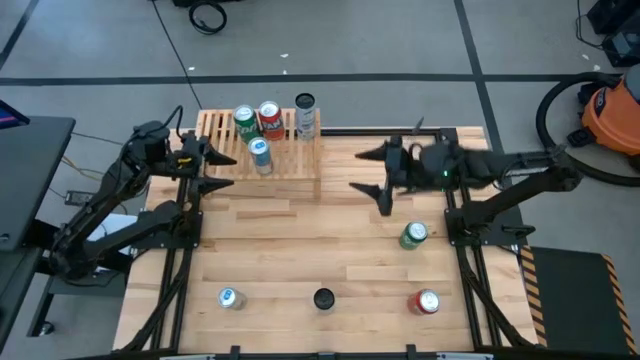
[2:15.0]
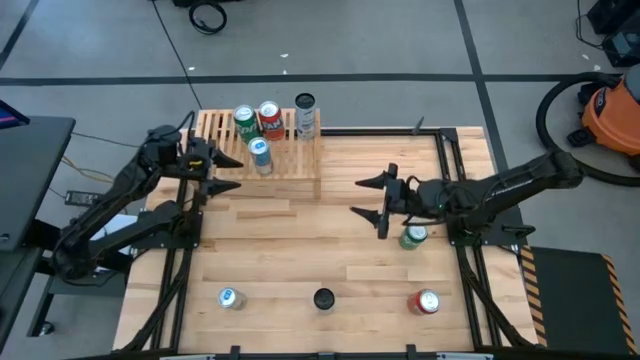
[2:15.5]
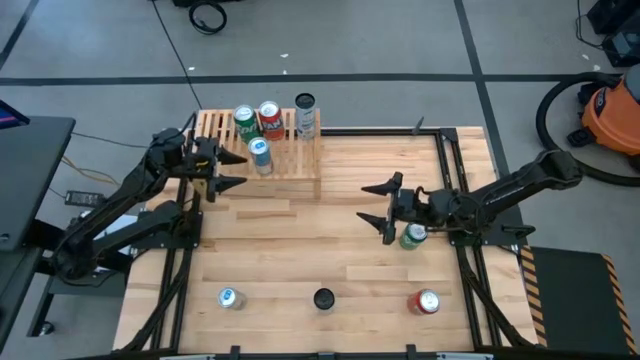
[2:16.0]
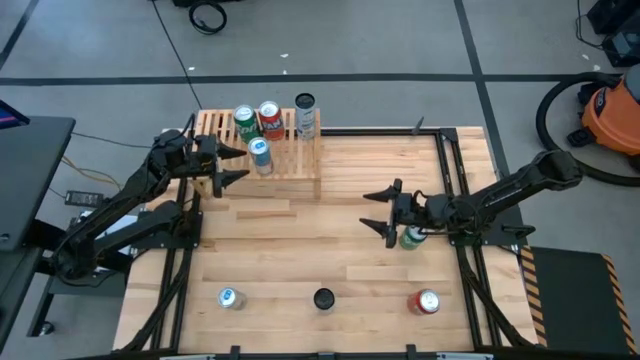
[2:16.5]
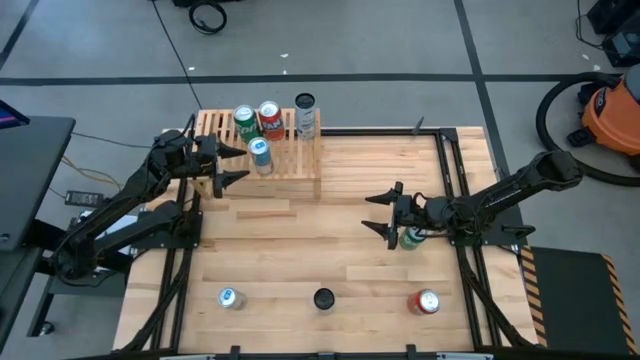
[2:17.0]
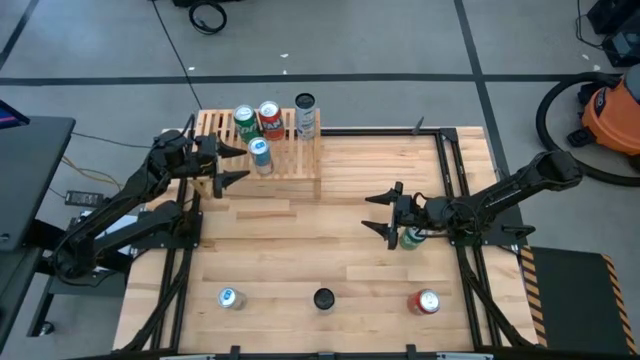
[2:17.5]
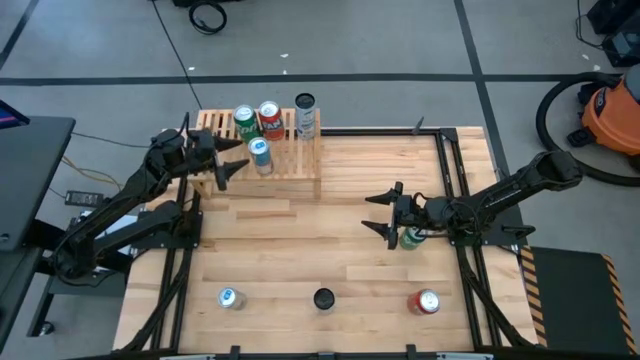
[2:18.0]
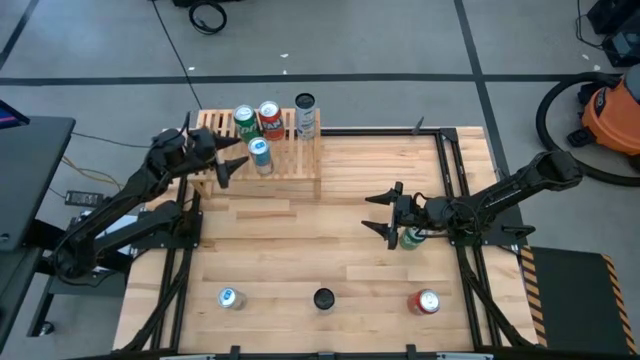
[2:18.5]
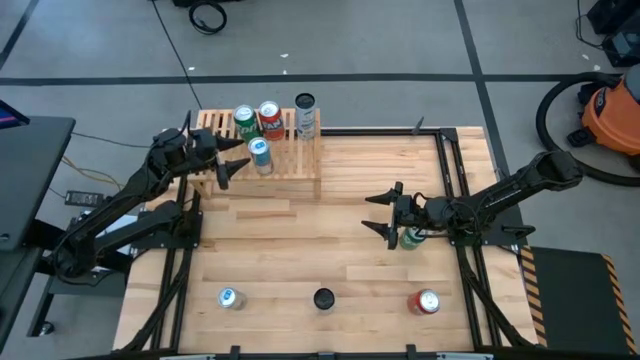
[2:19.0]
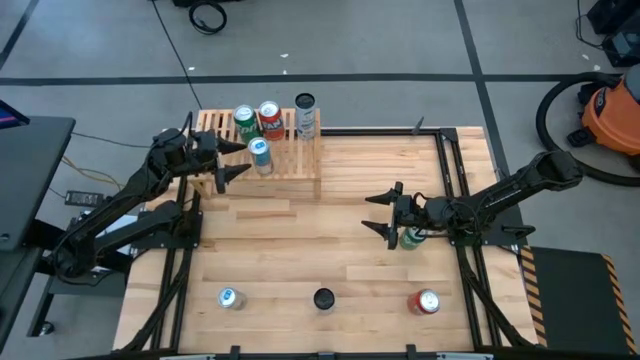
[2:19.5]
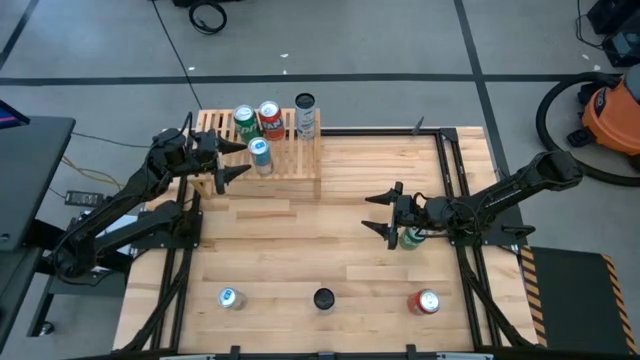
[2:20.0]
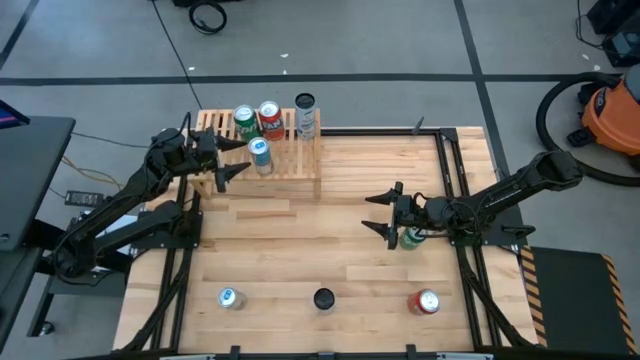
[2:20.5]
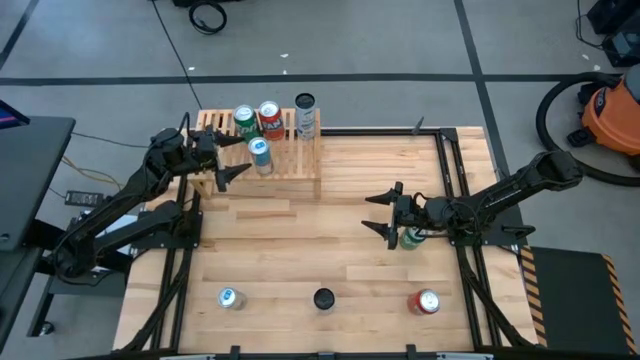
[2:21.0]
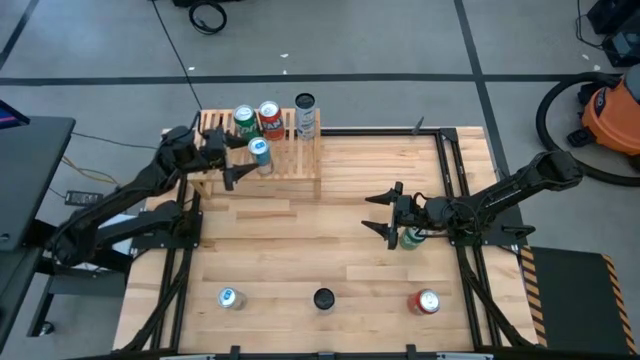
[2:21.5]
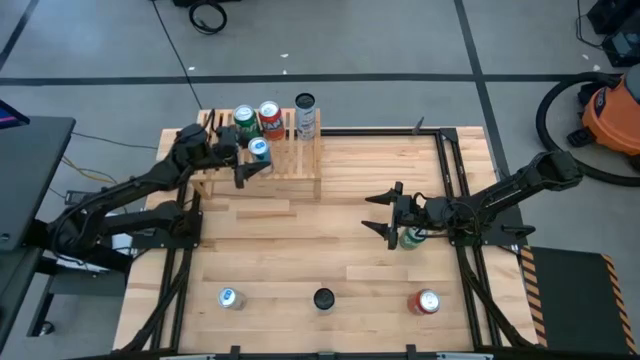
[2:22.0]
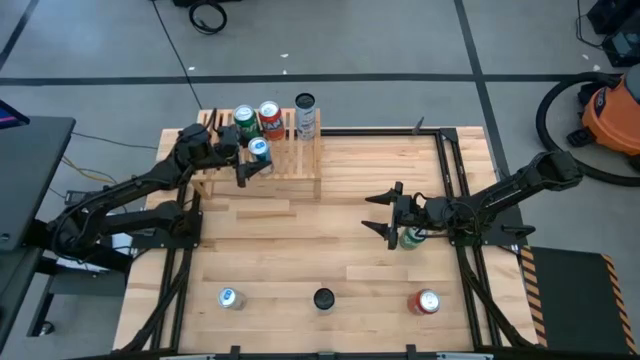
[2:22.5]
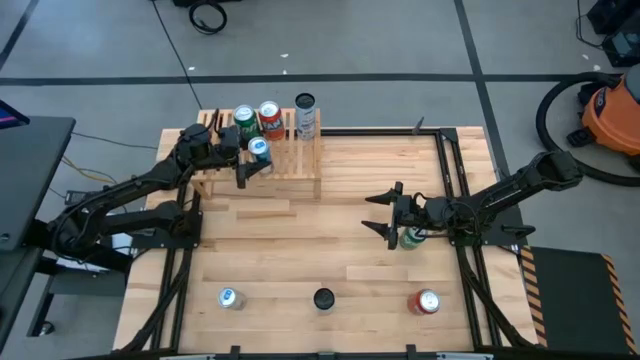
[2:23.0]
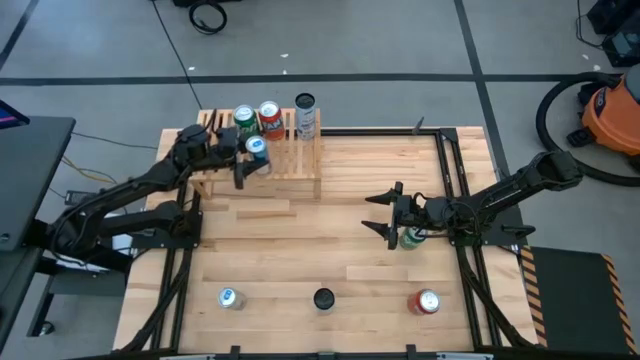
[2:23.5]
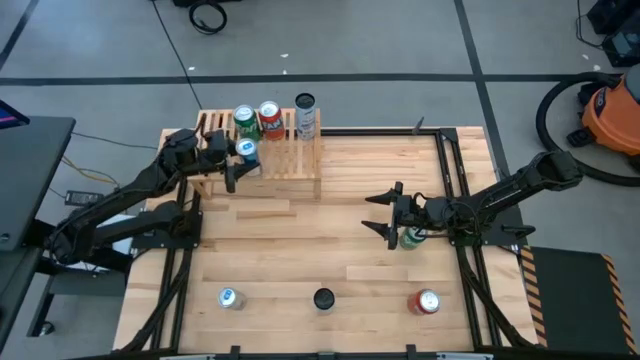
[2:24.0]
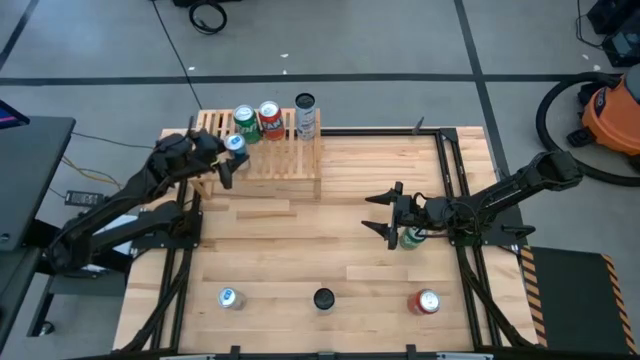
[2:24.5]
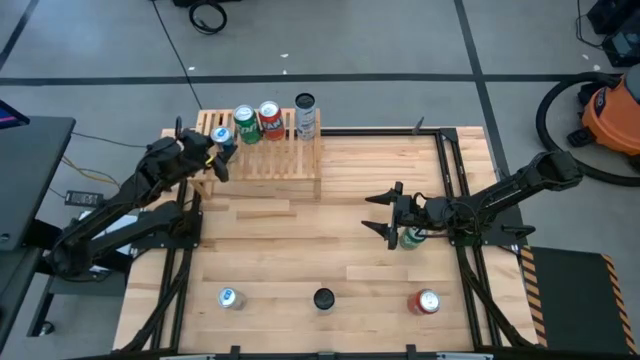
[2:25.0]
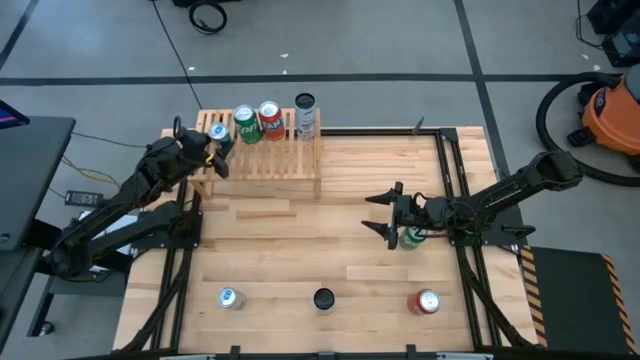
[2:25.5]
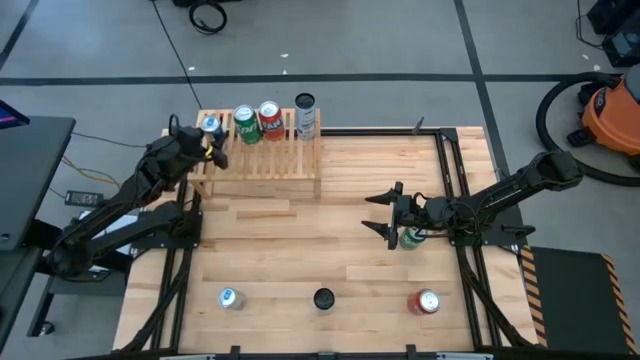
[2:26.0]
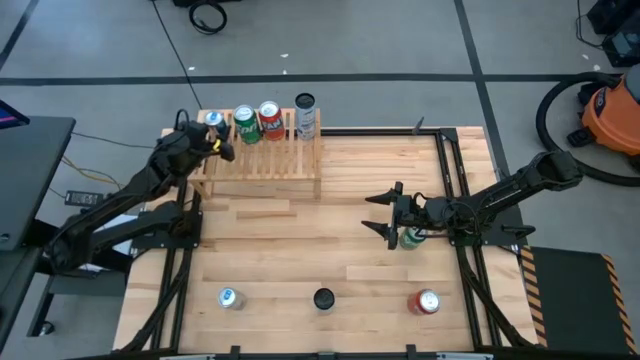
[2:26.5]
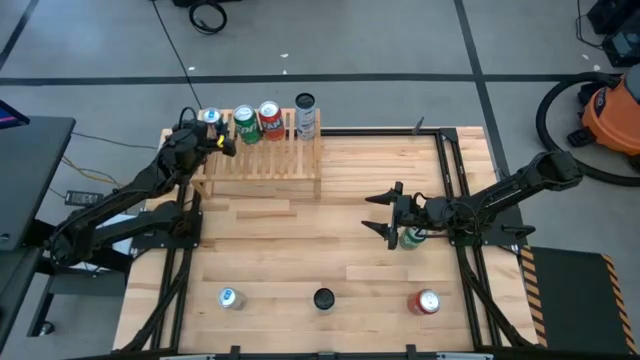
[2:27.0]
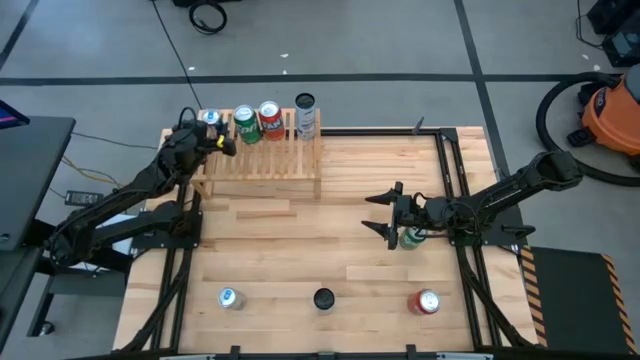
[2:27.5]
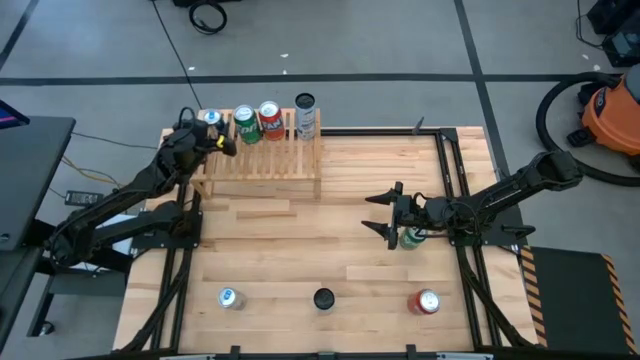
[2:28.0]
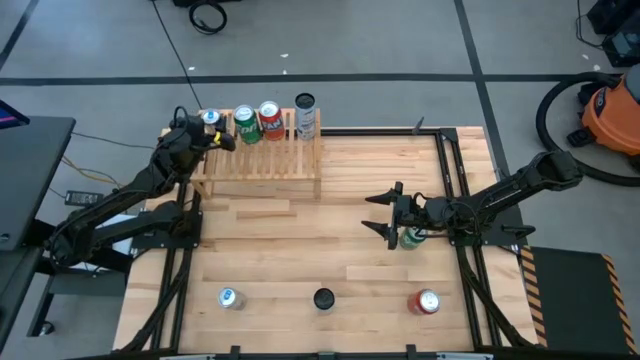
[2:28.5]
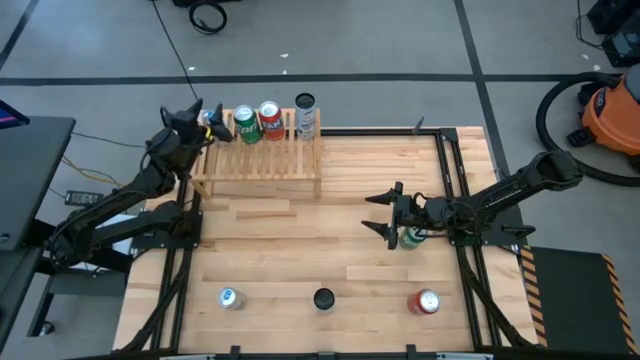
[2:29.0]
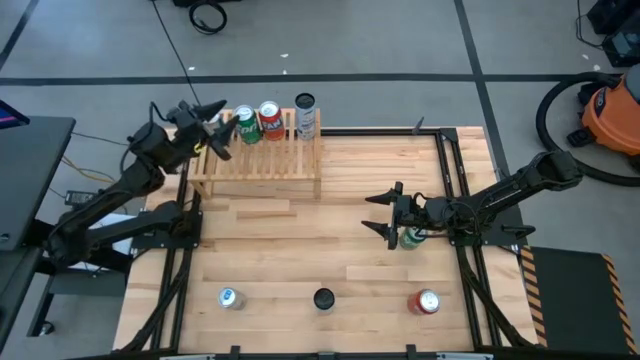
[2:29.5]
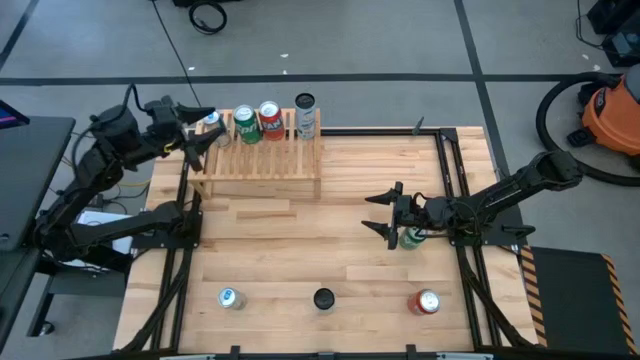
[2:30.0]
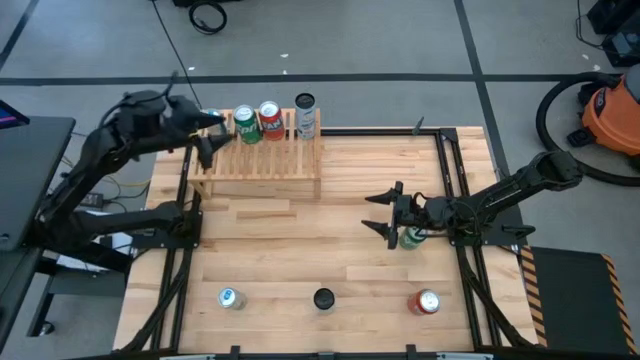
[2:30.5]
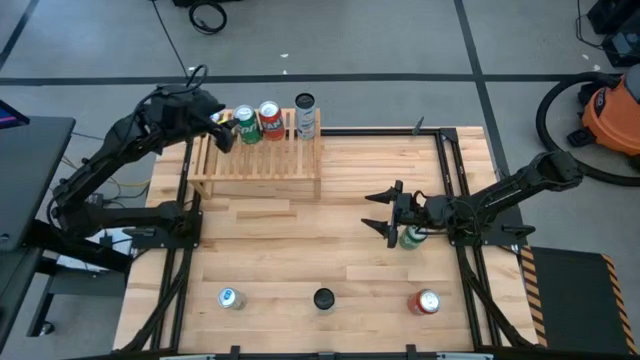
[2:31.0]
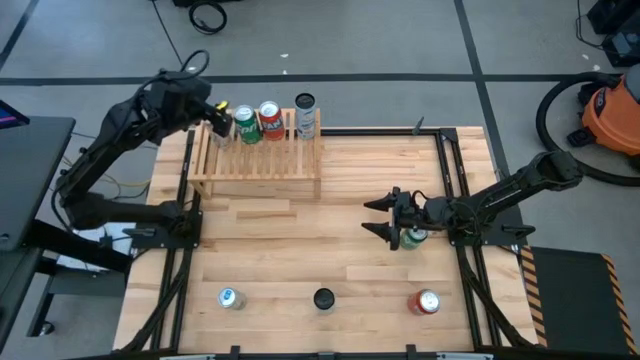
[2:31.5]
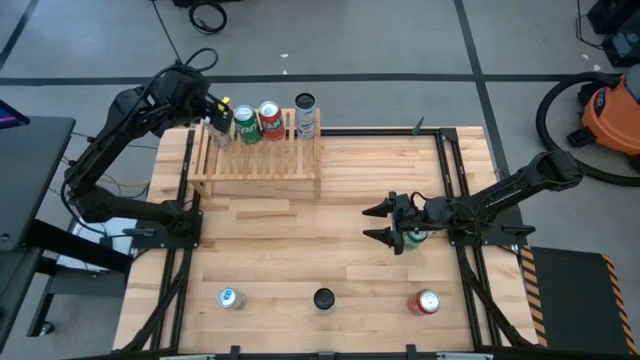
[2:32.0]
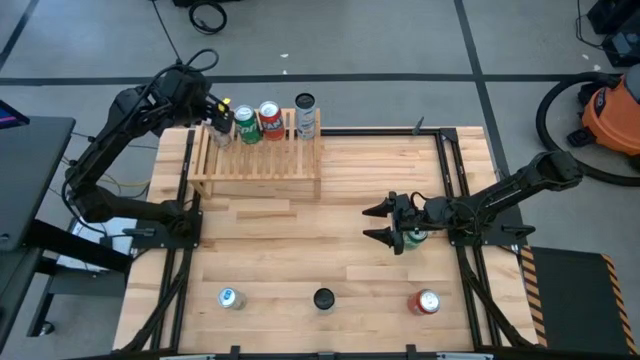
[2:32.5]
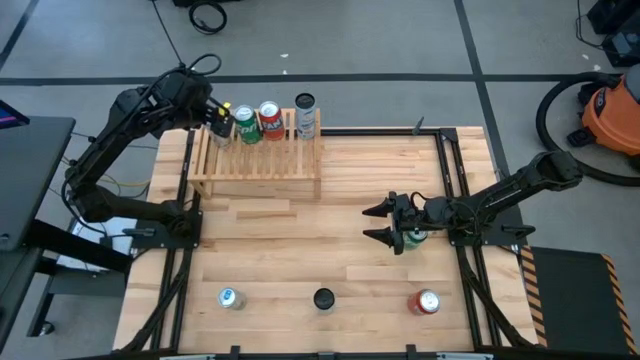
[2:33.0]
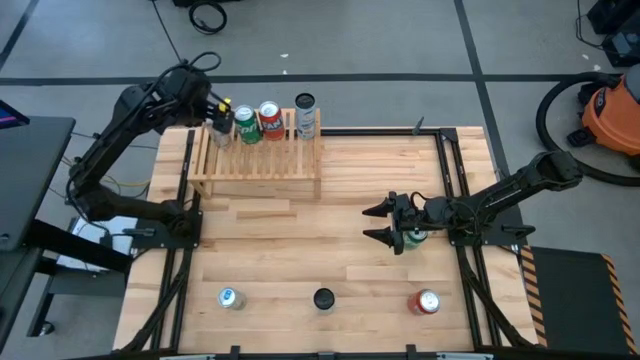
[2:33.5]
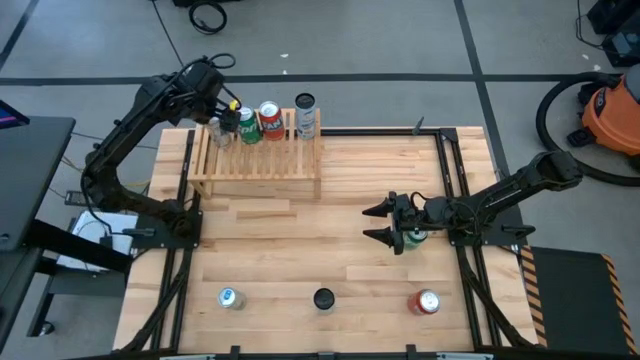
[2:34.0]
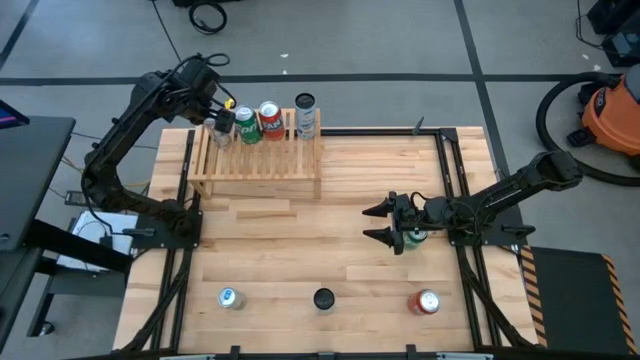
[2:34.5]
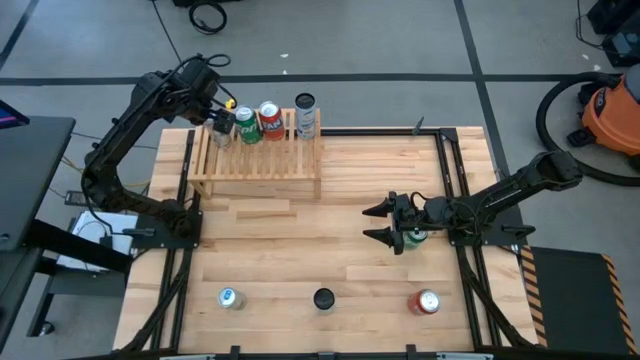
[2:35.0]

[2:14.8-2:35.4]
Task: Place canned beverage on shelf
Put the top blue soda can on the shelf

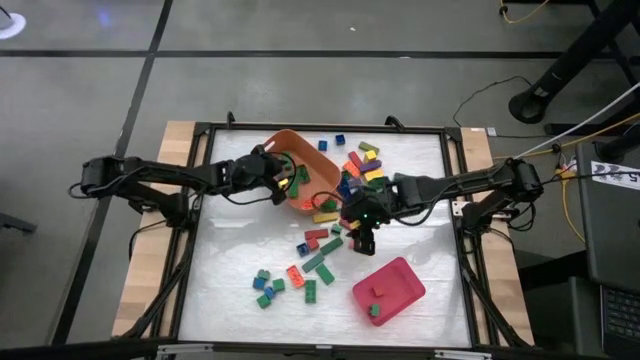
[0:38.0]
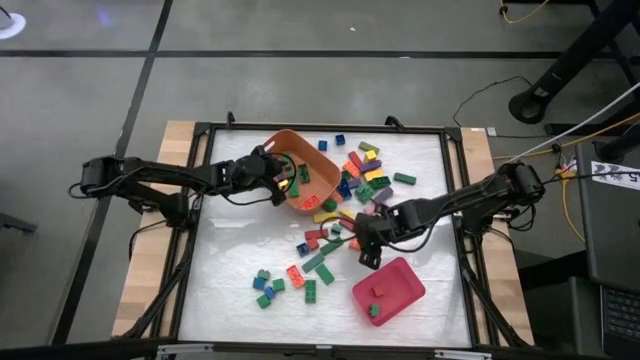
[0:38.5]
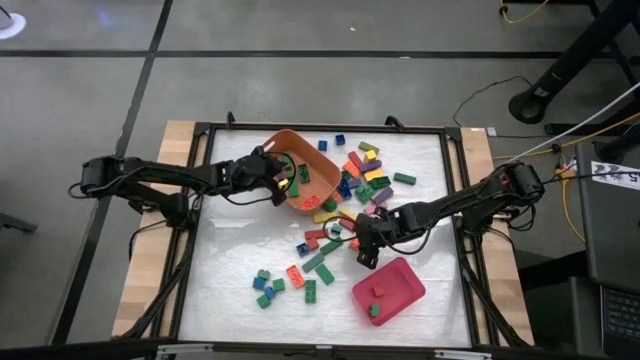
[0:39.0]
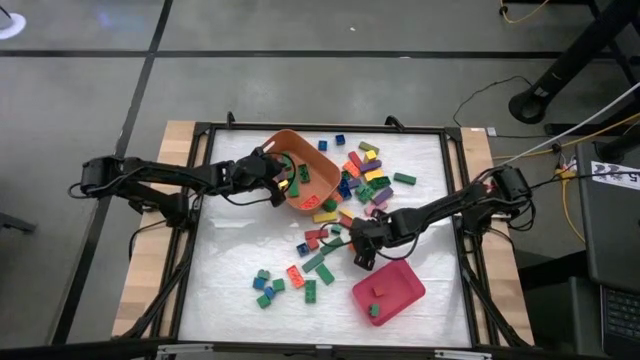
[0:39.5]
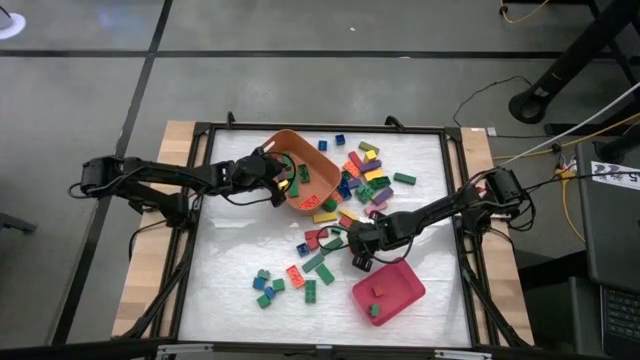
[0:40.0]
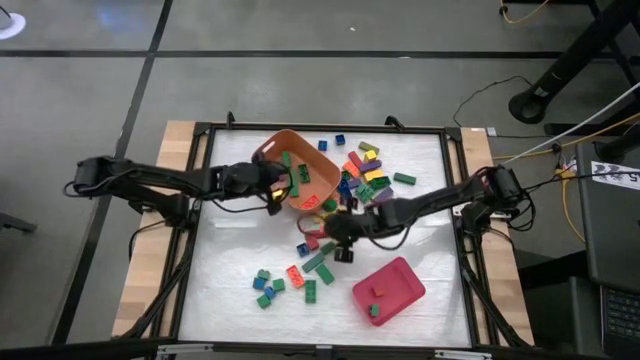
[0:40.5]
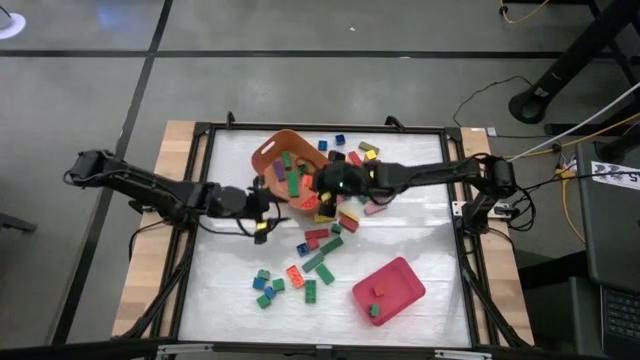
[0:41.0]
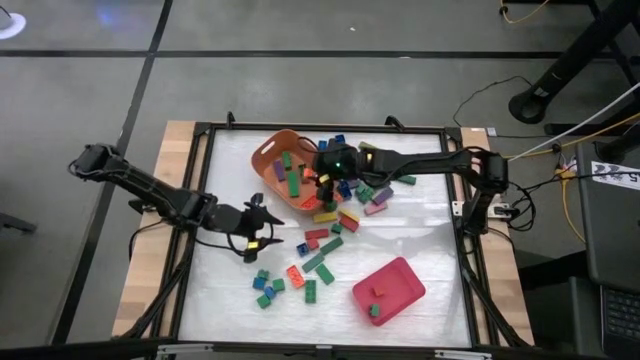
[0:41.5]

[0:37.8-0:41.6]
Task: Sort blocks by size
Put the large orange game piece into the orange bin
